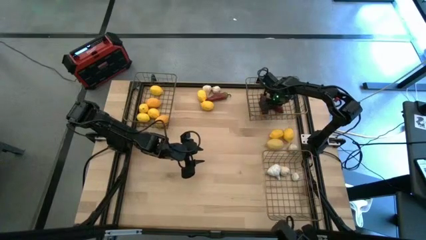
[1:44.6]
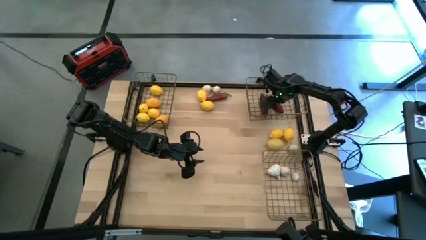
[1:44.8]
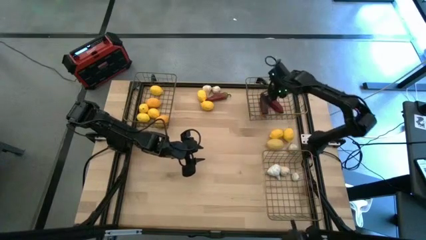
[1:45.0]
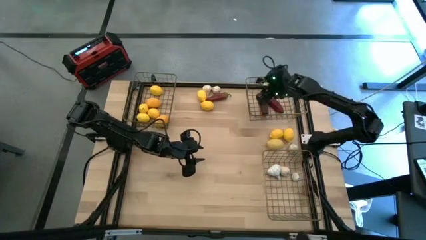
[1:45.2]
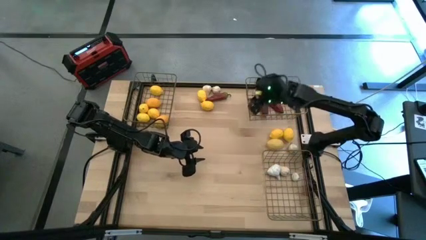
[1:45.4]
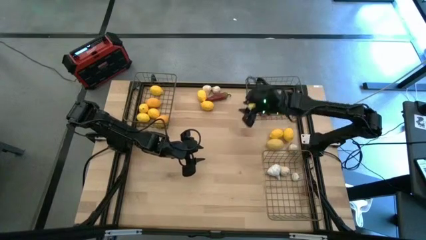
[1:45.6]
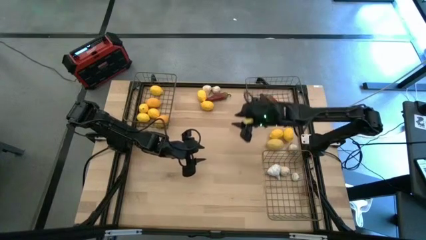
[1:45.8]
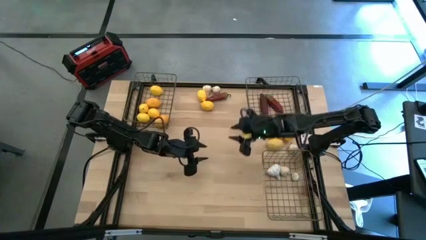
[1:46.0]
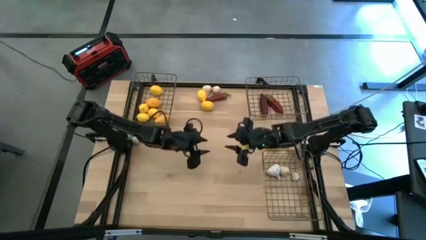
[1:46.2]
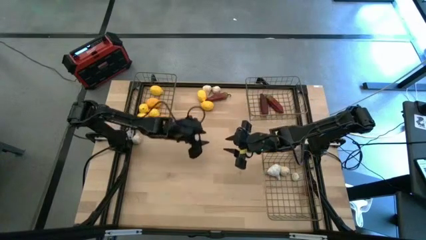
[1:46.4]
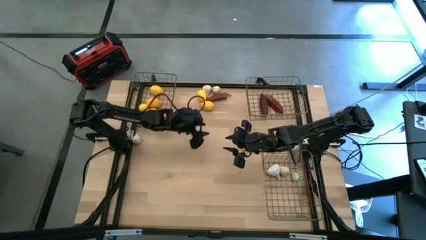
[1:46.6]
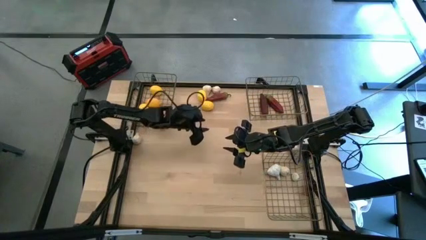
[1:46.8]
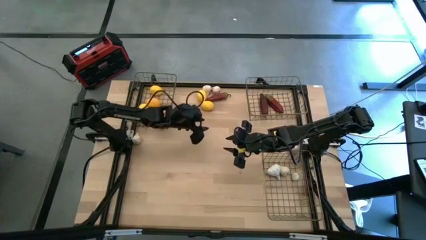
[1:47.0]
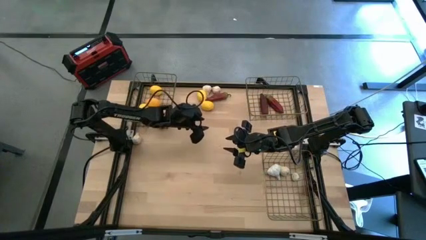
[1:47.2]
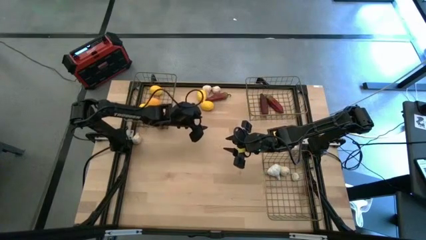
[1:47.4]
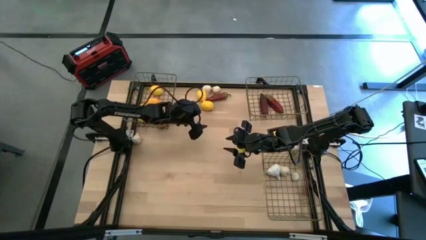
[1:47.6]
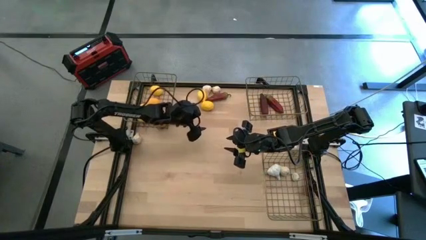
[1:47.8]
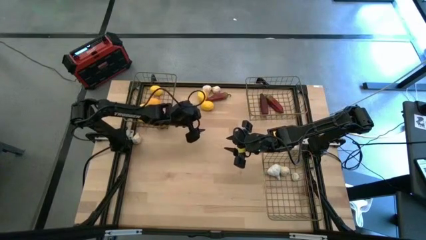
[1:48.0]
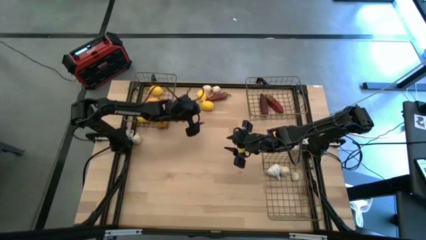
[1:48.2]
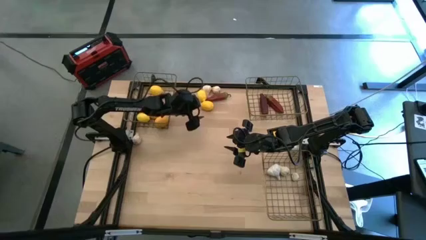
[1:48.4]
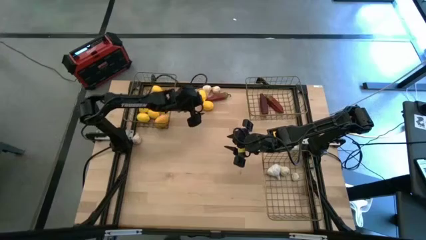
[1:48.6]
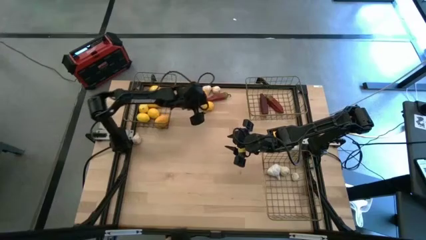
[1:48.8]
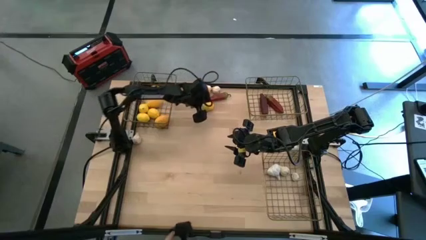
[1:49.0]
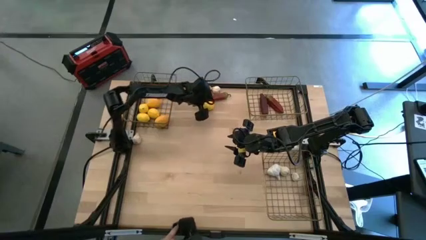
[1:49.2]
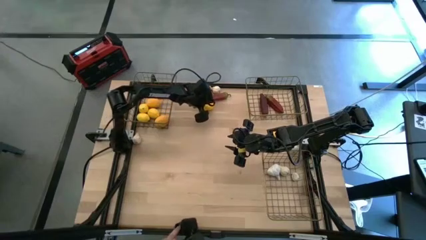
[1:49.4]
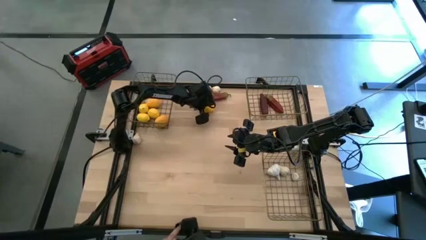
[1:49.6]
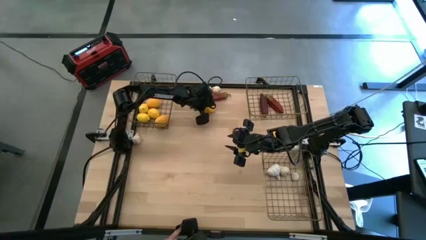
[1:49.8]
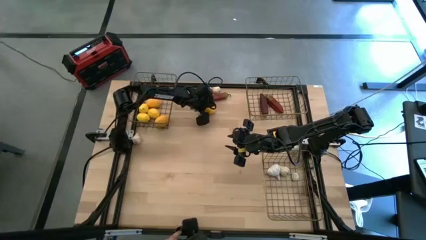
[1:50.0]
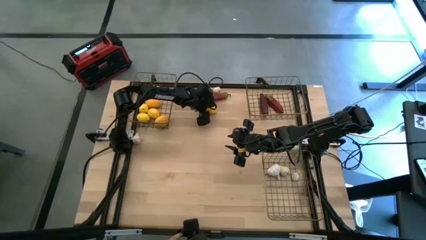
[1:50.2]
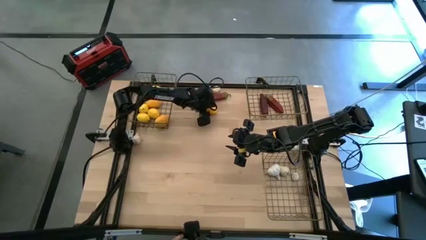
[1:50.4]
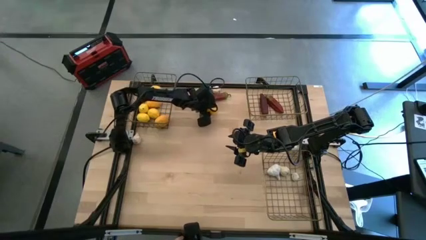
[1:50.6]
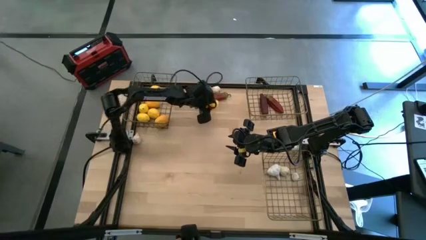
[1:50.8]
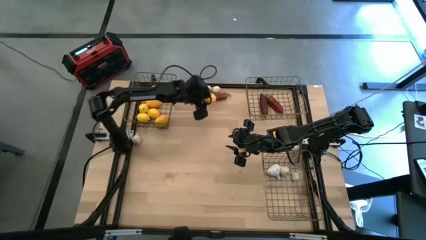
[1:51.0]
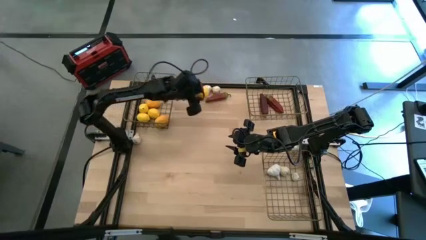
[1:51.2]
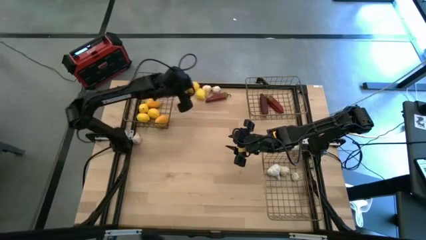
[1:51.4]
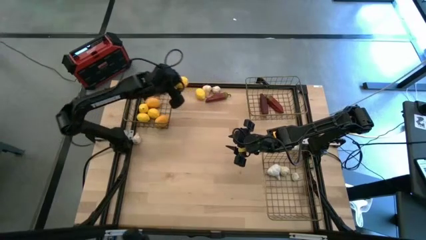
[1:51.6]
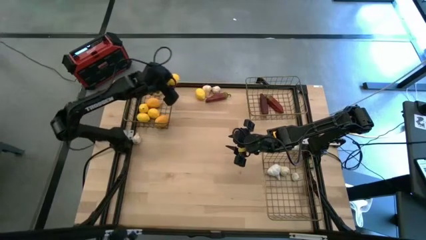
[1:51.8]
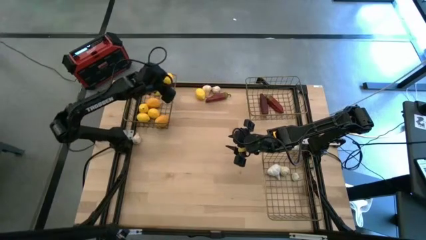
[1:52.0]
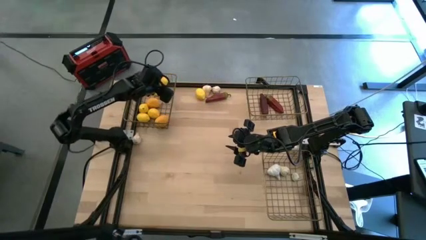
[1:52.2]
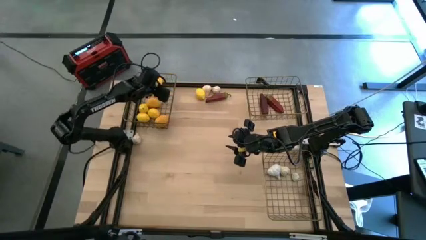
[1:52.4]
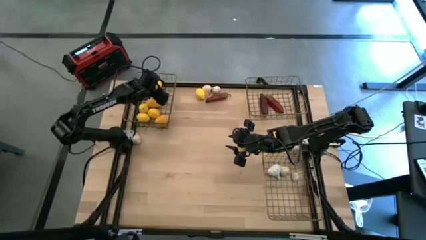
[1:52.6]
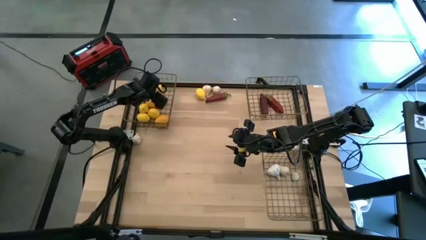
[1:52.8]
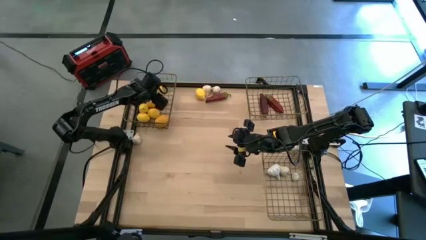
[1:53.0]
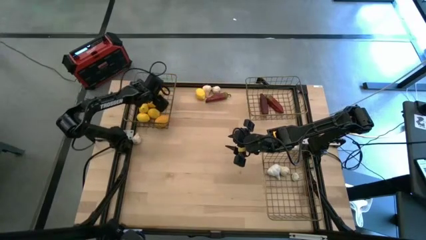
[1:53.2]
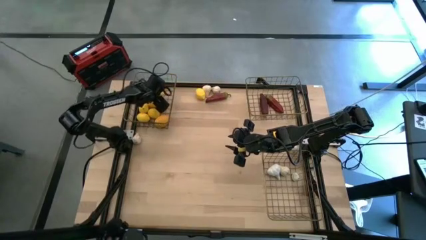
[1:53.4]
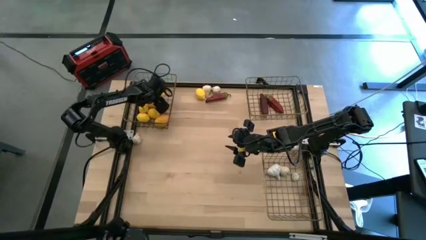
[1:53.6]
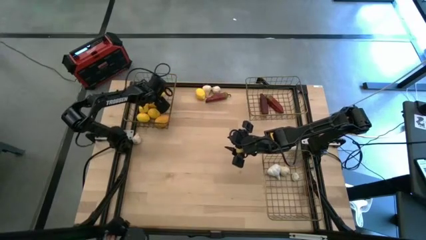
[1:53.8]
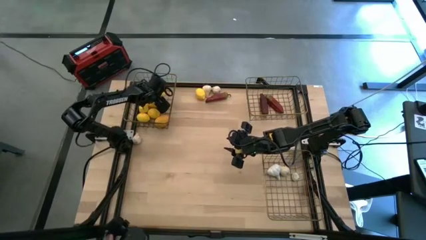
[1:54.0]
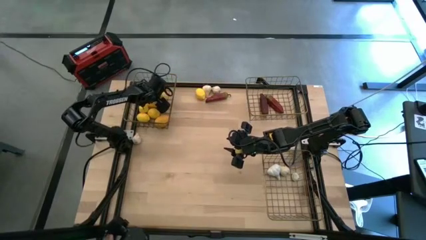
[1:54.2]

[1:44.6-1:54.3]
Task: Sort produce into baskets
Put the yellow lemon into the top left wire basket

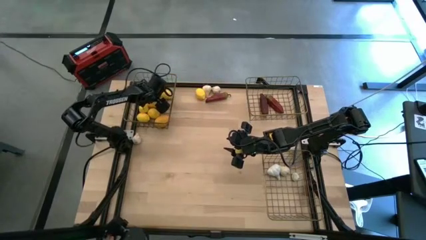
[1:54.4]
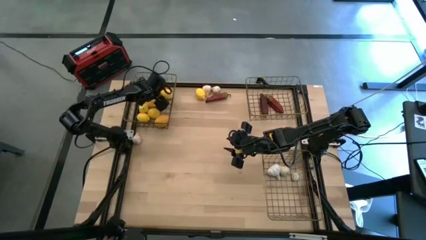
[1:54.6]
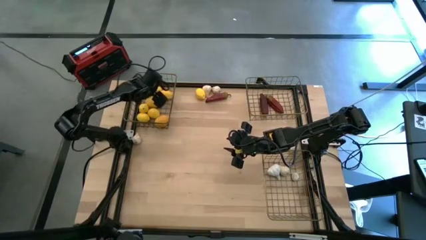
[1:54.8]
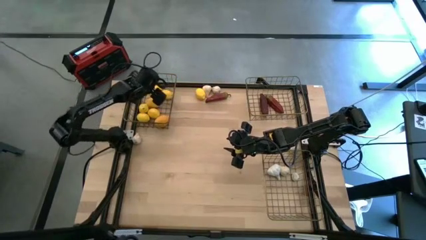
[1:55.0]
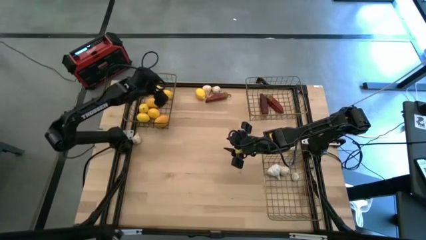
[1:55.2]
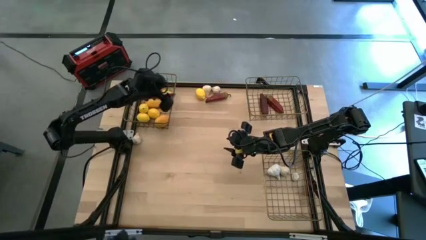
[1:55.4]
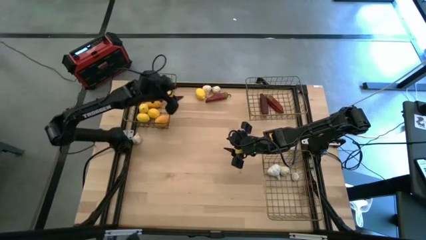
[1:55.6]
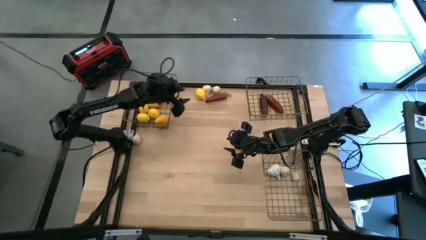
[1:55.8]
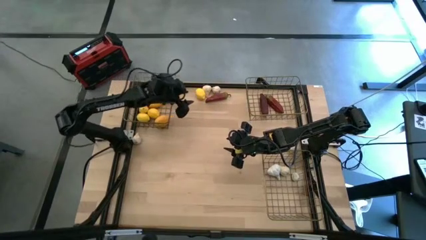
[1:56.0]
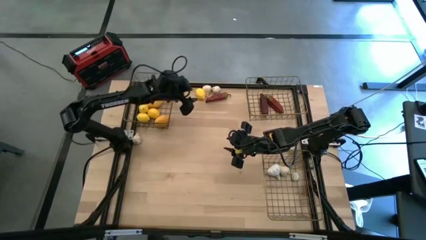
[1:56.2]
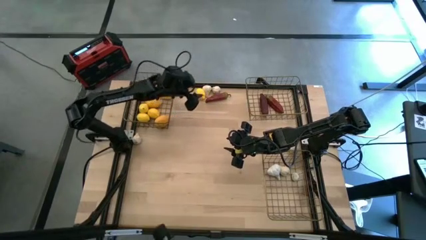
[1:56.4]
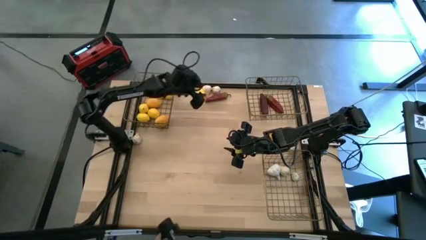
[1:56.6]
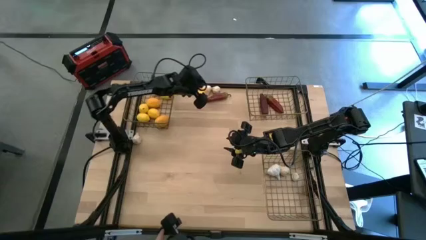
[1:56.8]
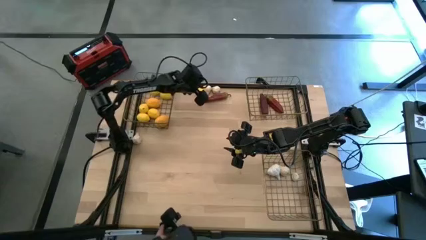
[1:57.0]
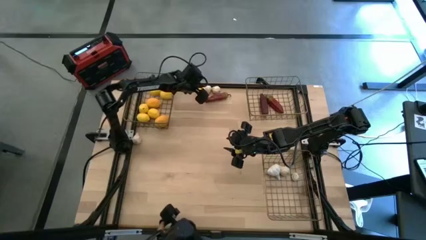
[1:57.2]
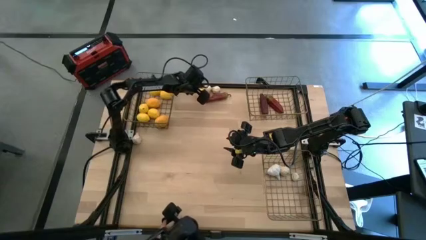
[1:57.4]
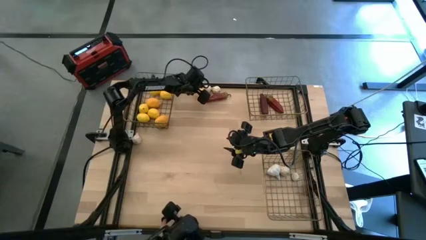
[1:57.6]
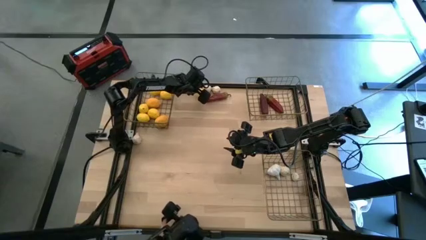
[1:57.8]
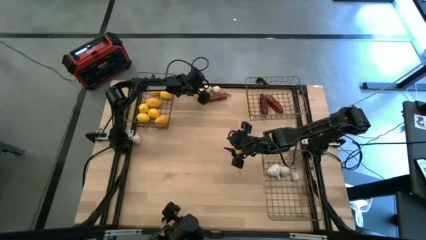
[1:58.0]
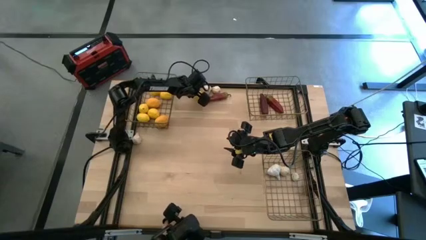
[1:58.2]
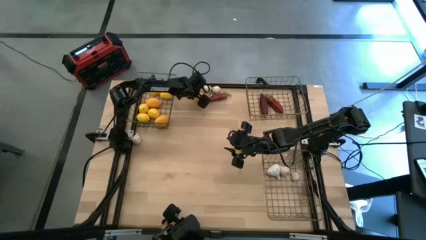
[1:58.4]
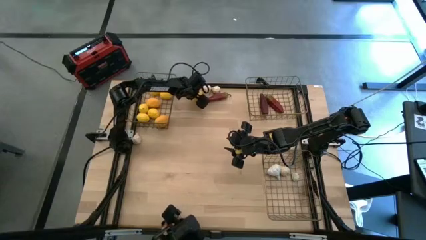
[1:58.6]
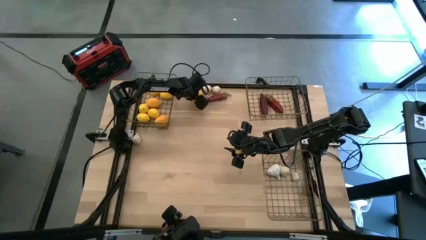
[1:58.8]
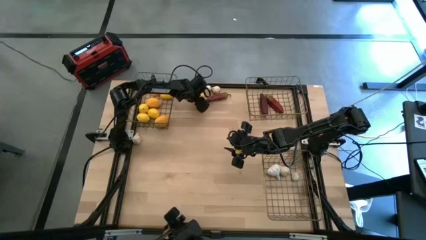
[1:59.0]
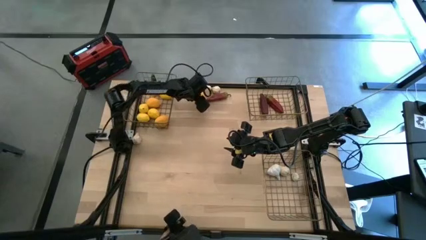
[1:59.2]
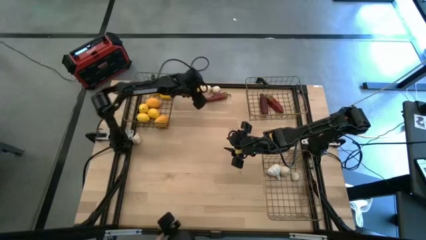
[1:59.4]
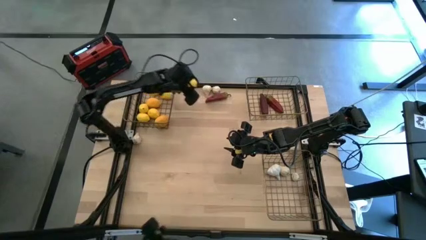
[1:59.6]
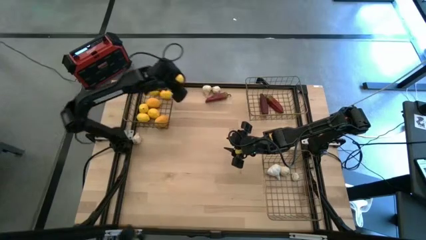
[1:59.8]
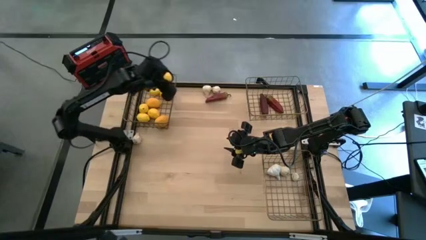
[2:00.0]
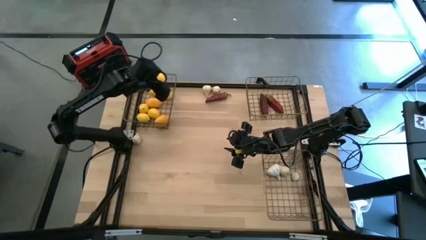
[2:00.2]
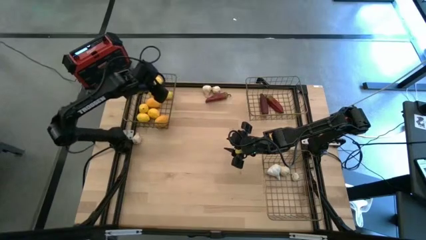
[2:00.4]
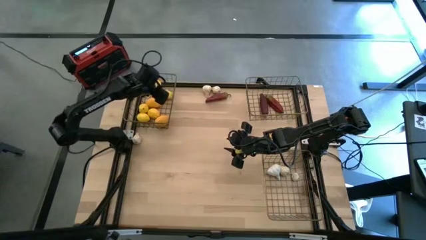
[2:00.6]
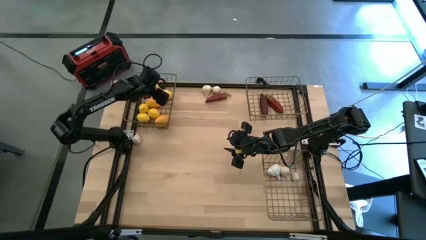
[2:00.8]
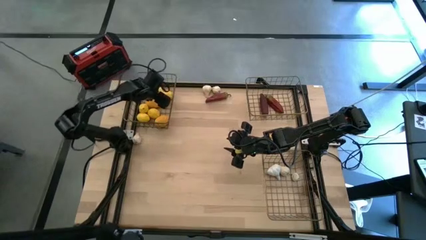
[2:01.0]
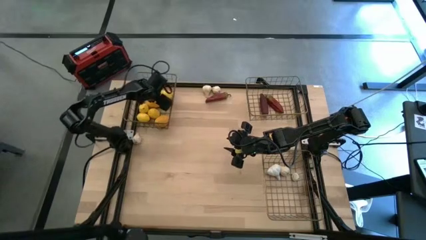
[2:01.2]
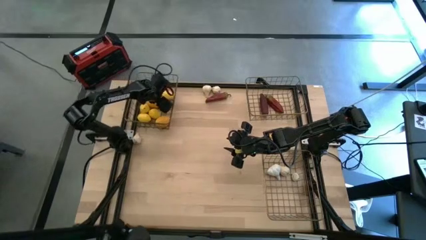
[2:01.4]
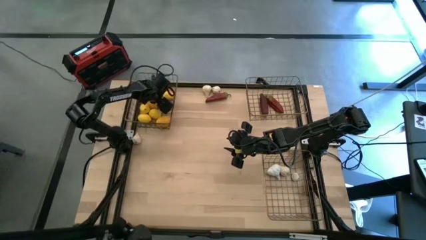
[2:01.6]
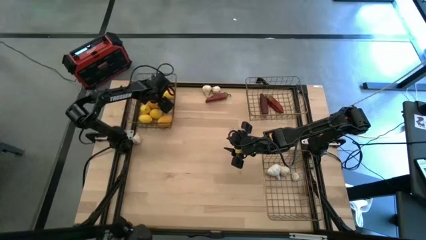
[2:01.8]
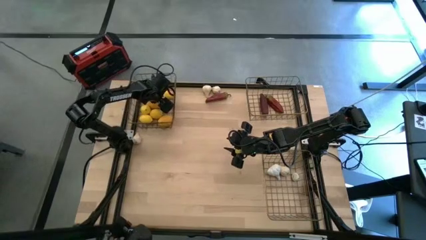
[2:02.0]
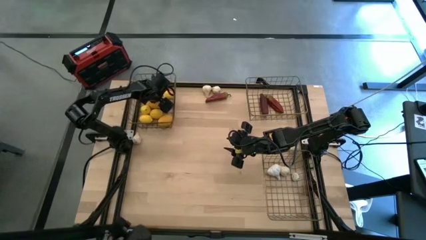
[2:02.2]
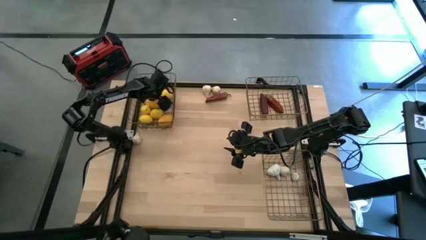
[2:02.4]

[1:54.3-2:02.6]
Put the yellow lemon into the top left wire basket
